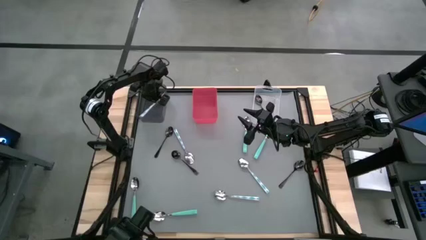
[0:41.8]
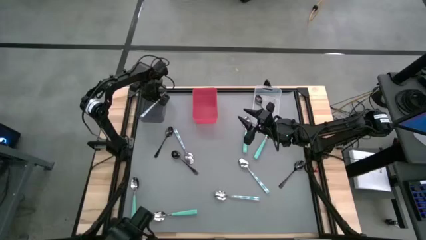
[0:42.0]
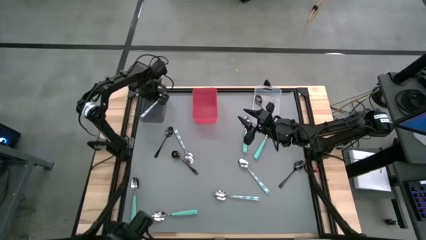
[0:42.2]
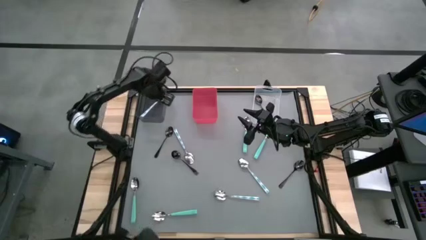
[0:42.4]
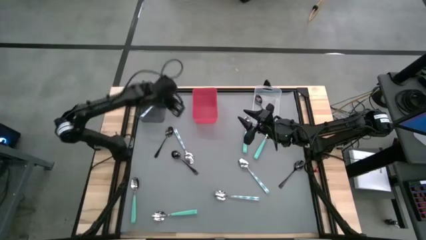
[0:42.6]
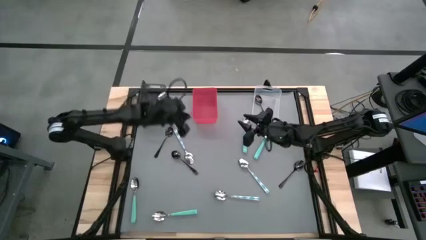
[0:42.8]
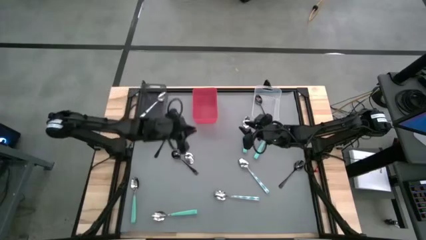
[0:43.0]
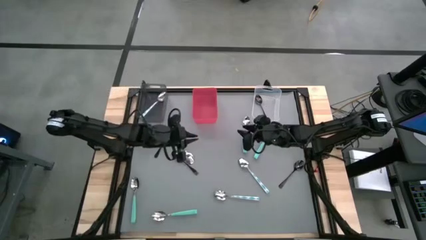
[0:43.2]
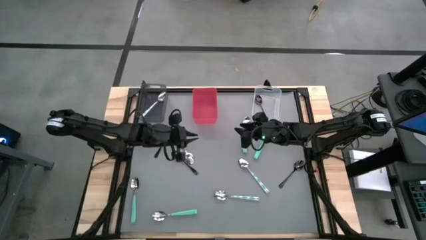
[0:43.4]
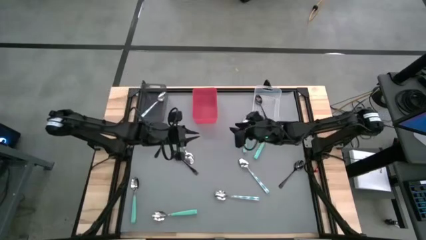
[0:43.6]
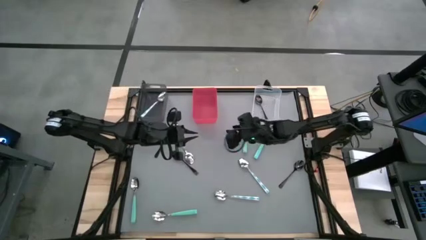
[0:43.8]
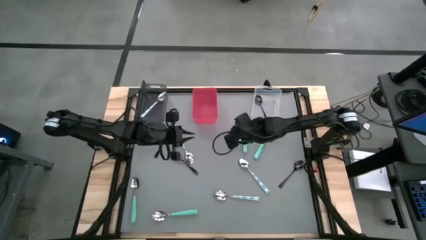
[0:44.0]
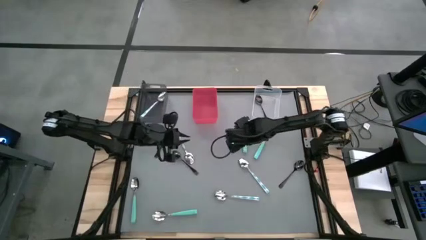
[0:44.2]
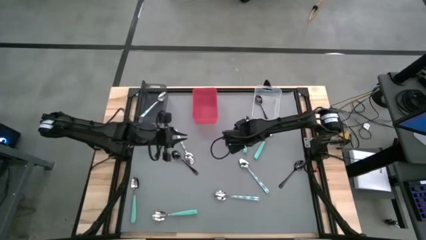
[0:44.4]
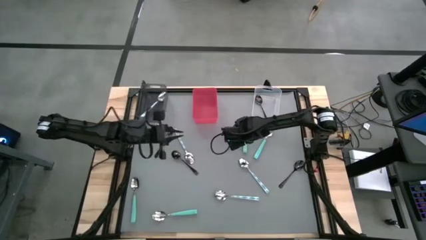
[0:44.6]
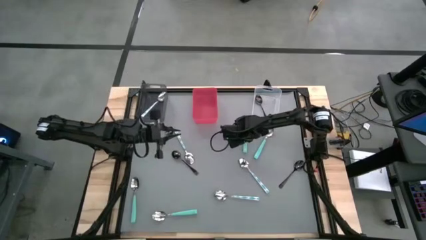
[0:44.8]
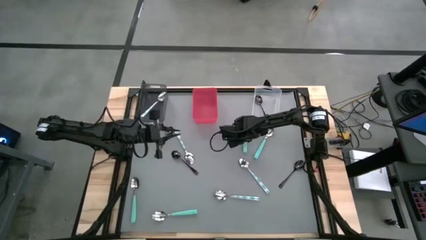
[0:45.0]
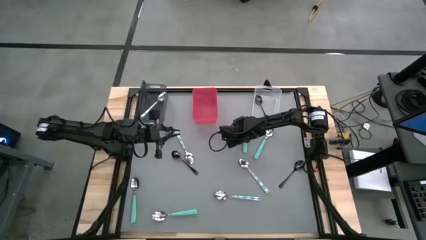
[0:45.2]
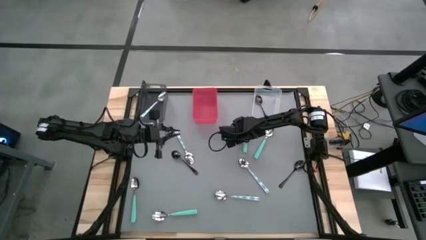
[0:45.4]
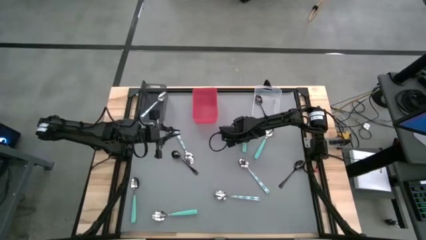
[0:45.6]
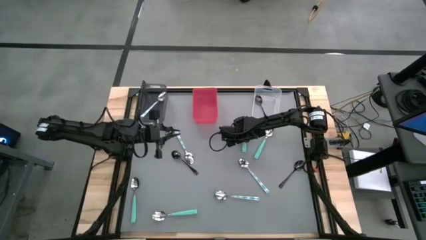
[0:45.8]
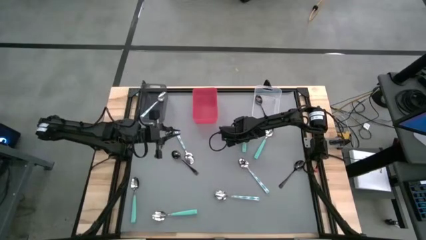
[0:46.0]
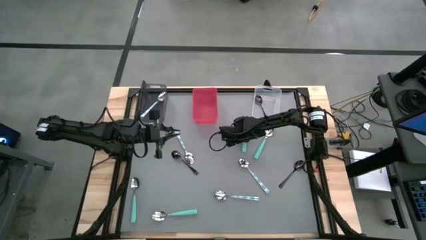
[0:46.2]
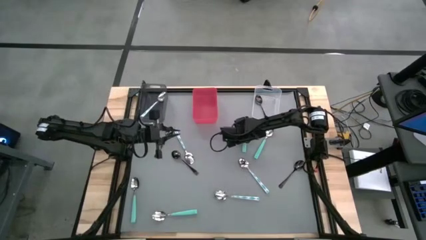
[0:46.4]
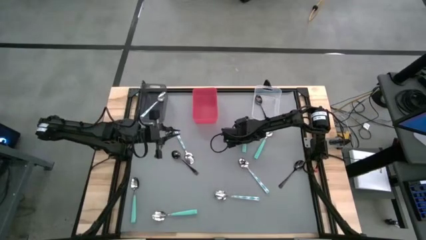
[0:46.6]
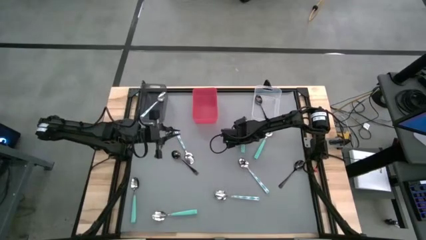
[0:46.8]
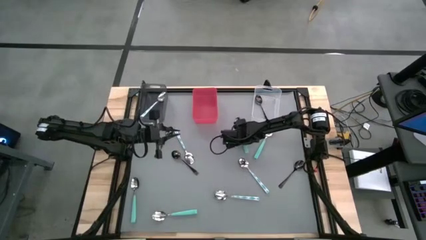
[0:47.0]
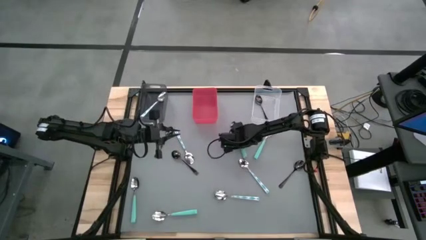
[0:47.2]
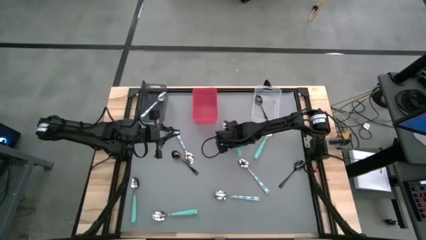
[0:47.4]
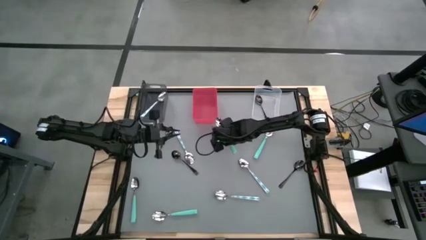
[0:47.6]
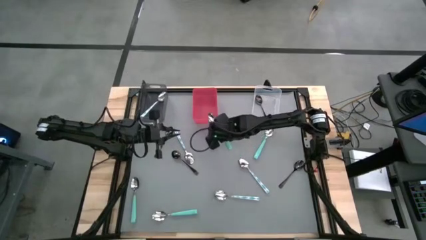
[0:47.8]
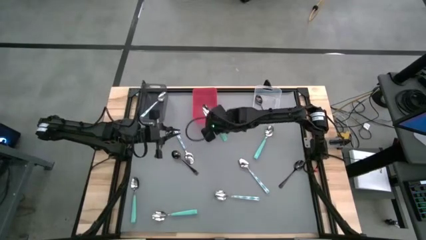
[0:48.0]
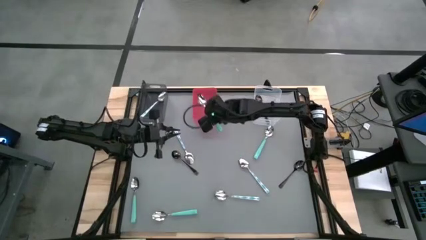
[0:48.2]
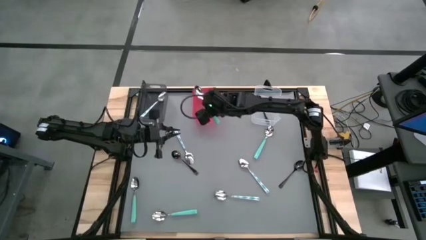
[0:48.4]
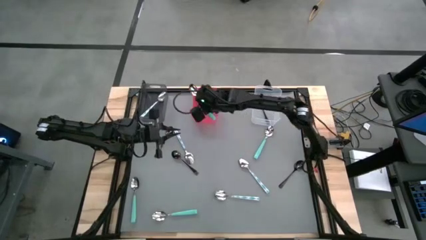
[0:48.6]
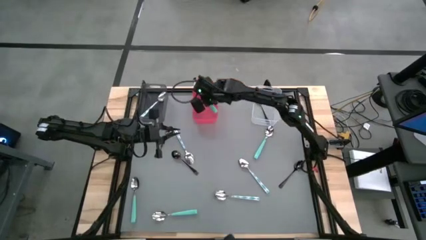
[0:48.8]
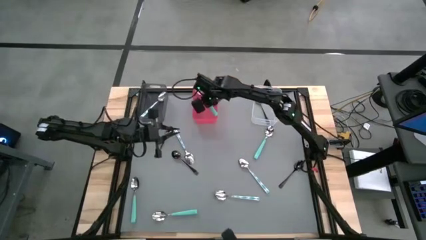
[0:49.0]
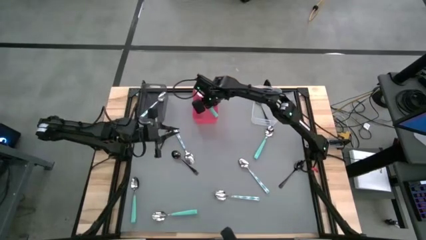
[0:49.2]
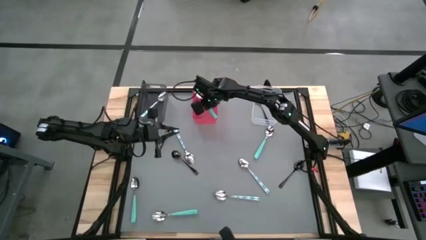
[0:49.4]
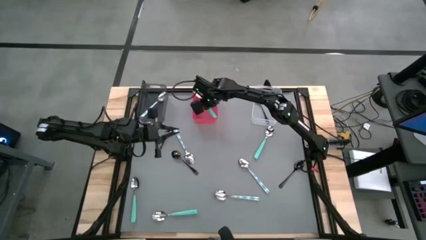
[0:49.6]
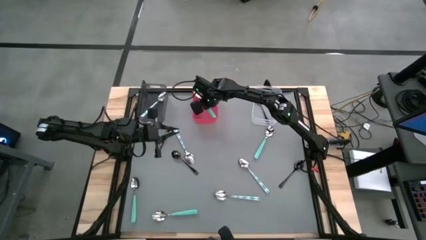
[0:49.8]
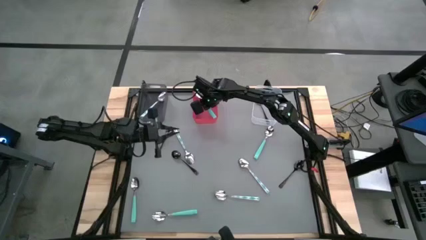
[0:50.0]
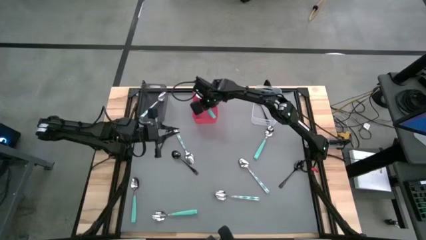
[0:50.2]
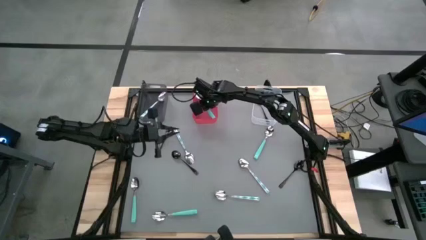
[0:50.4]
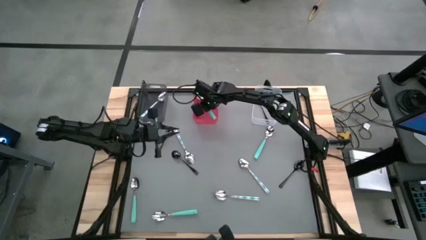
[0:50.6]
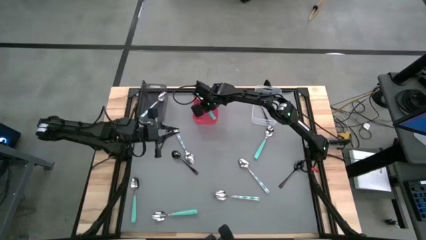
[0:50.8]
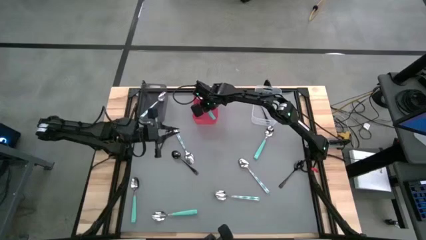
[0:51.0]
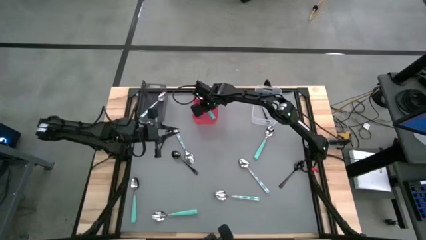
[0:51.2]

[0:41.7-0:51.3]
Task: Sort silverware by color (type)
Put the light blue spoon into the red bin

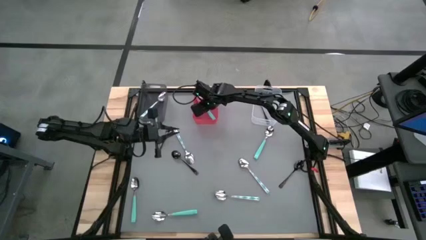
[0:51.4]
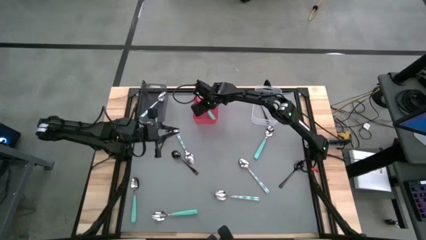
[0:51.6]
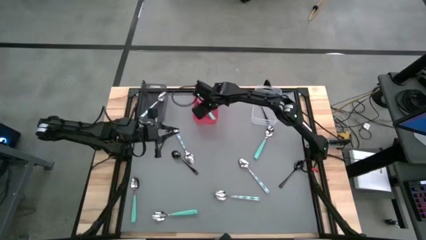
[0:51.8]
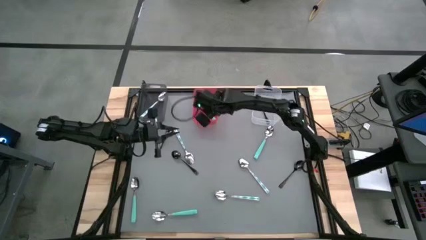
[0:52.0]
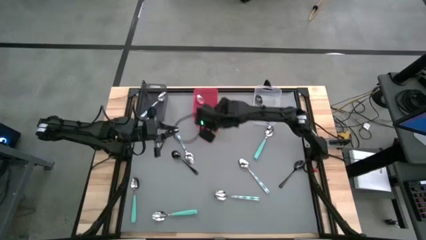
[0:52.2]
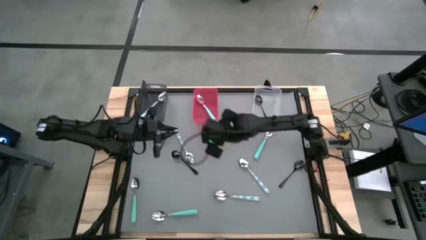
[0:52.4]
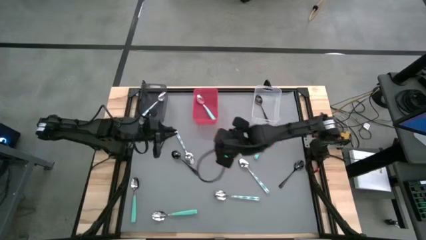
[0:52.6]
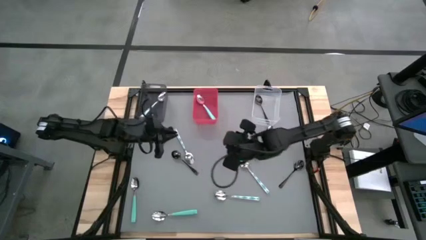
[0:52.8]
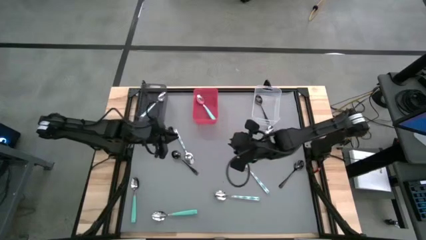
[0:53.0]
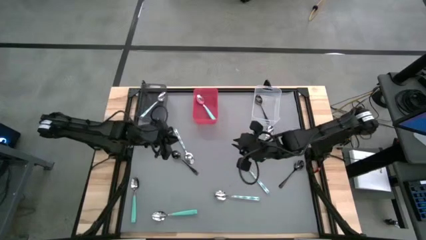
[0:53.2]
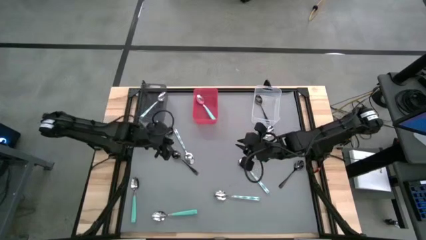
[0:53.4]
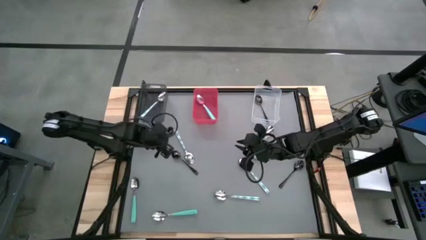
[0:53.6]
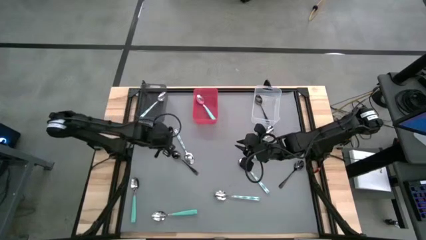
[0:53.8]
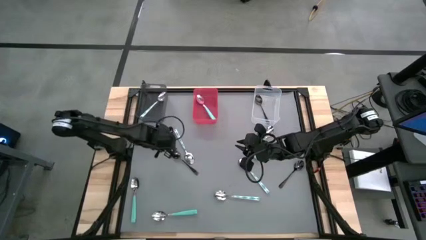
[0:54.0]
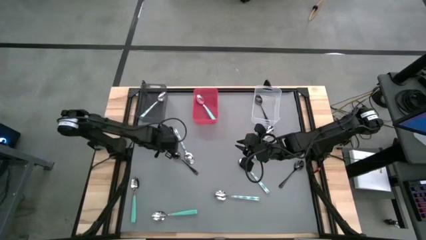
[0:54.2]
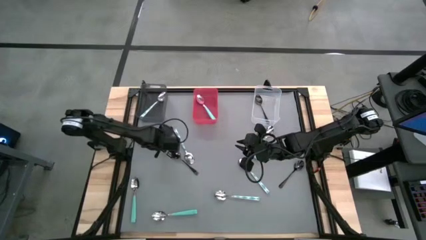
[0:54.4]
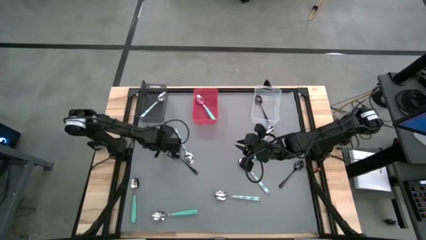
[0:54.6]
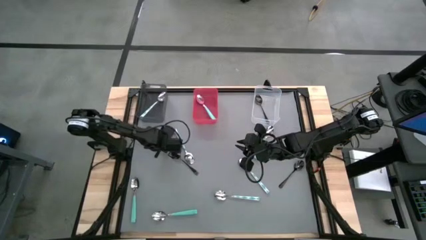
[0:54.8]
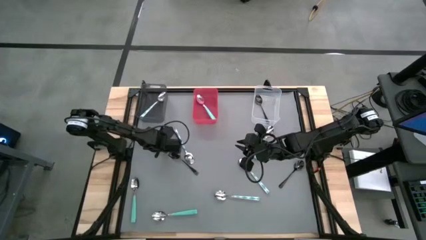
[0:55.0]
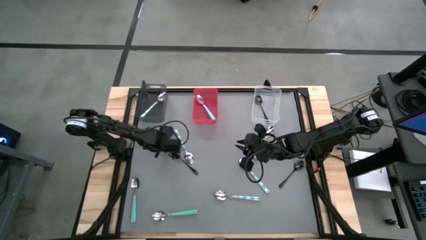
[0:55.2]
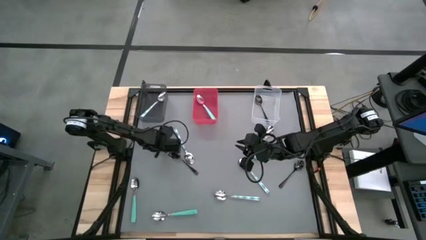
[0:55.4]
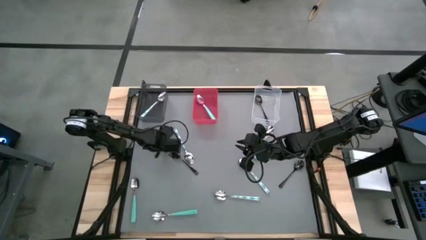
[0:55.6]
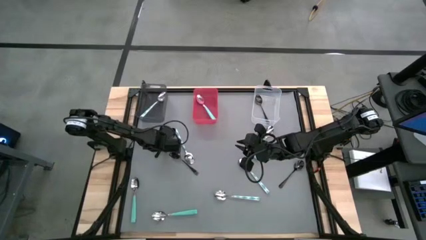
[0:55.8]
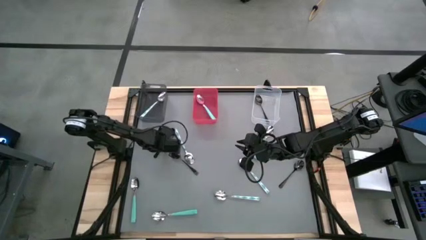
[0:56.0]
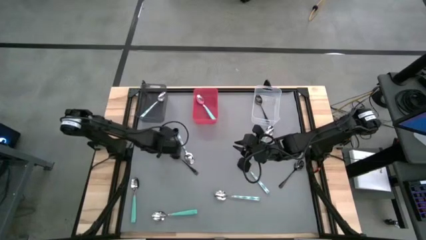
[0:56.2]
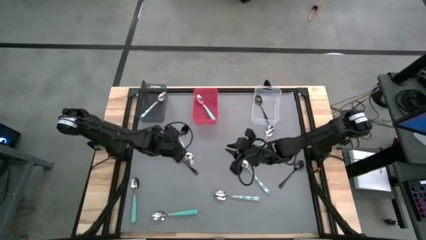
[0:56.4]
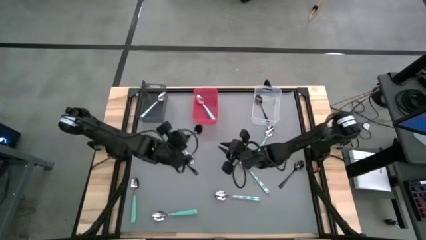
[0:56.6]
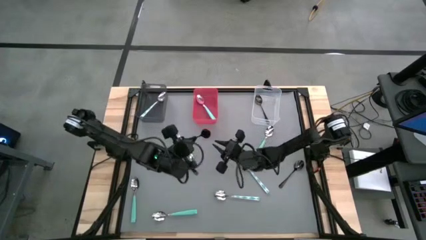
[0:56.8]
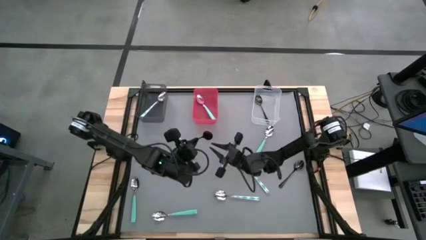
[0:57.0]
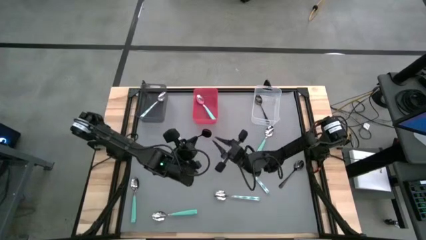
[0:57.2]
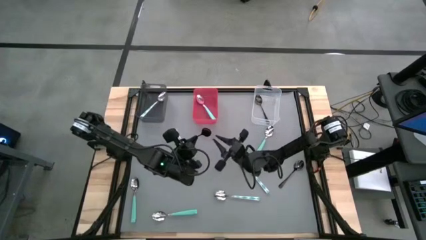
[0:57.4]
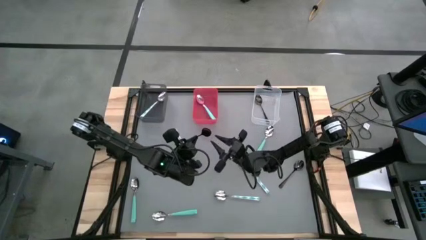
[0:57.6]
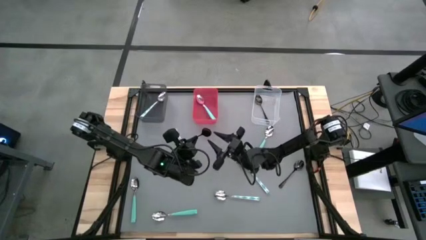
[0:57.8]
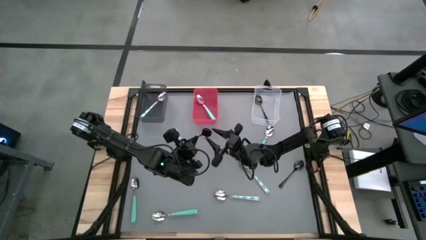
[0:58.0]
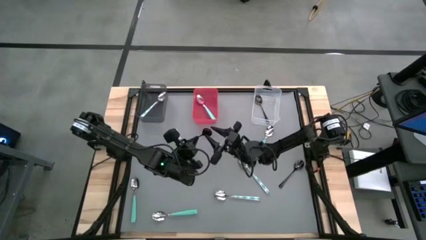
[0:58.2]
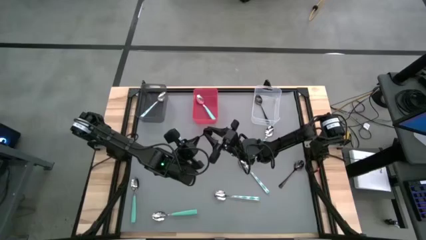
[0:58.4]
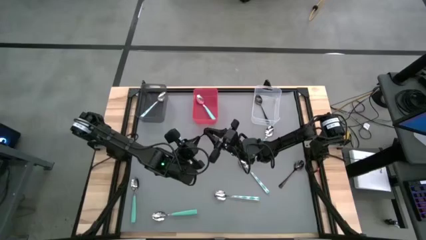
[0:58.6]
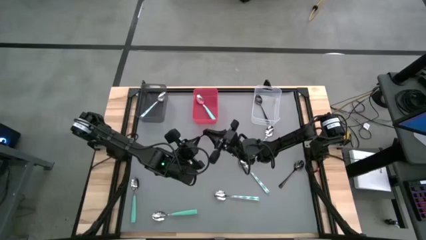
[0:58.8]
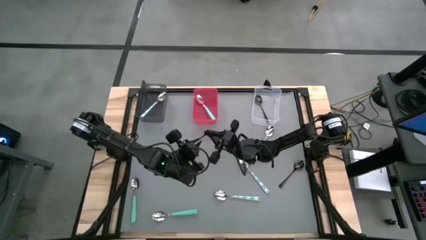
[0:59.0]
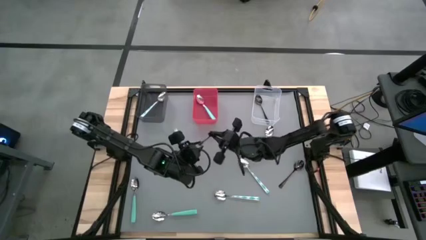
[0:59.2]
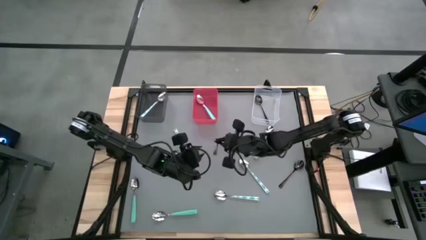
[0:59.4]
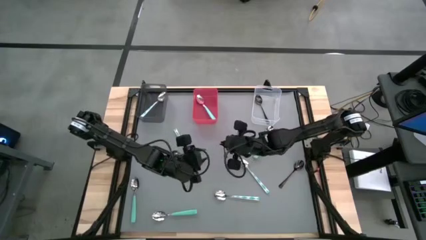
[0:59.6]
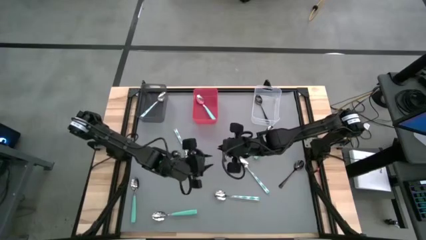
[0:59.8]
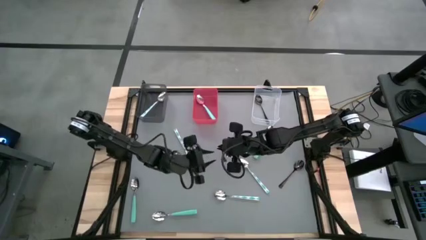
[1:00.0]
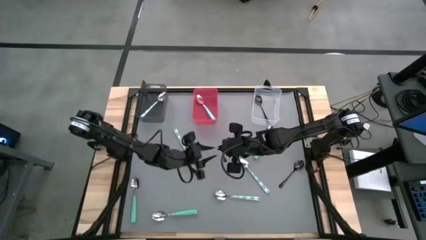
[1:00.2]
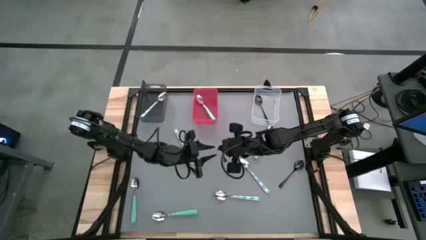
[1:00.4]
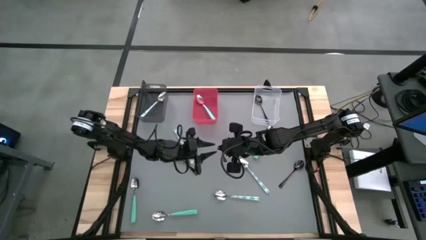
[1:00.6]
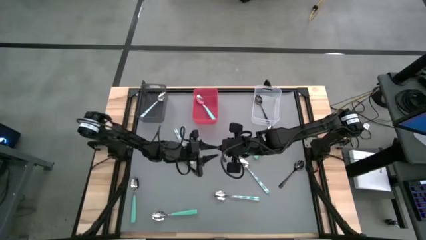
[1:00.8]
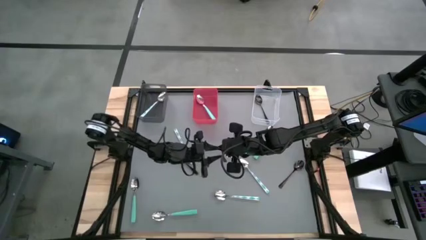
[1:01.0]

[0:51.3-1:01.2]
Put the black spoon into the transparent bin
